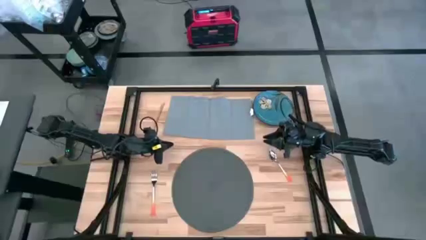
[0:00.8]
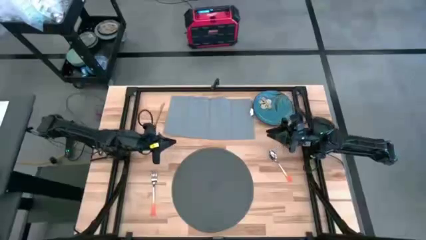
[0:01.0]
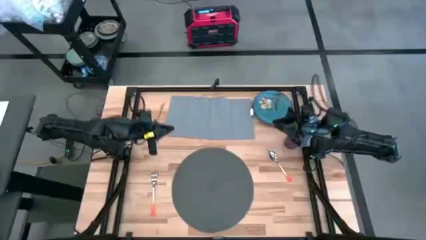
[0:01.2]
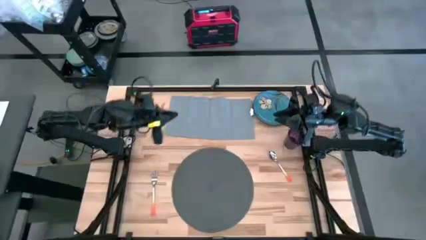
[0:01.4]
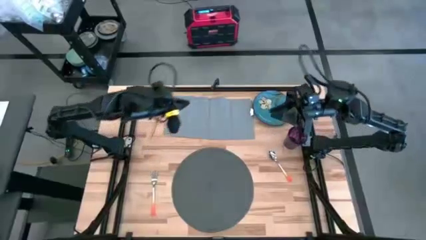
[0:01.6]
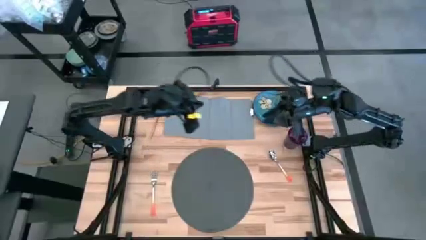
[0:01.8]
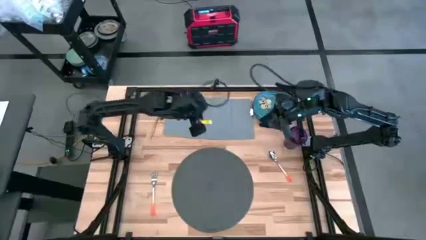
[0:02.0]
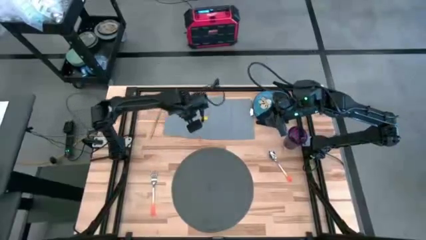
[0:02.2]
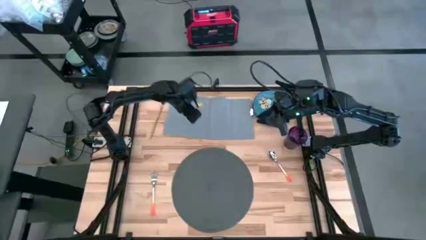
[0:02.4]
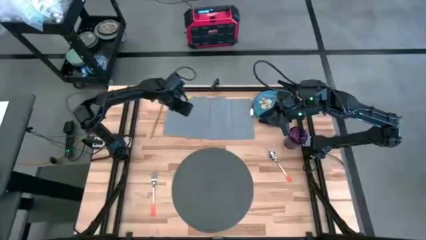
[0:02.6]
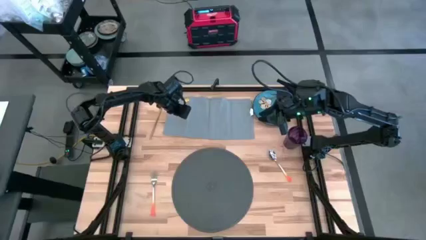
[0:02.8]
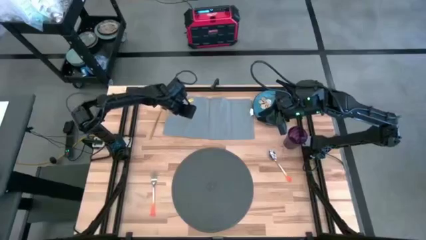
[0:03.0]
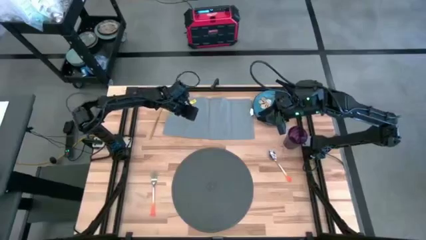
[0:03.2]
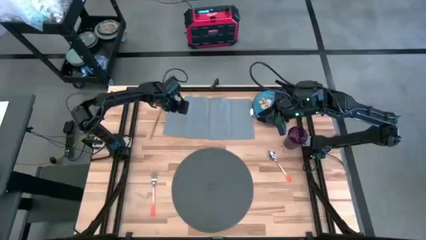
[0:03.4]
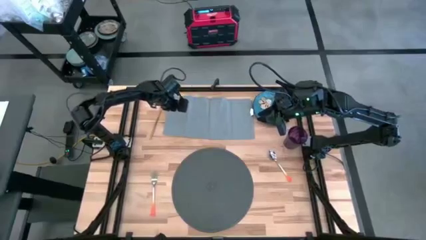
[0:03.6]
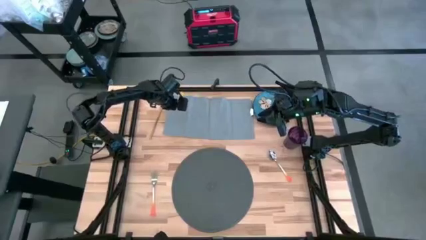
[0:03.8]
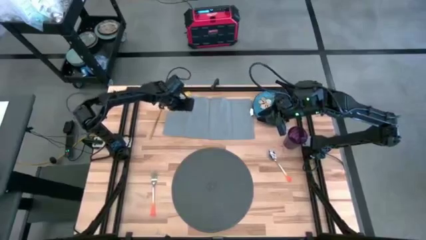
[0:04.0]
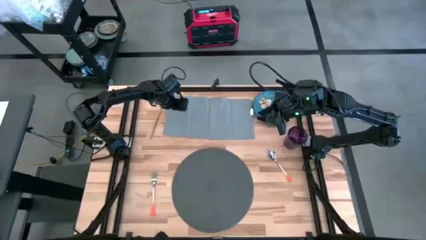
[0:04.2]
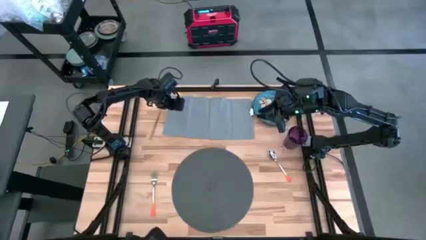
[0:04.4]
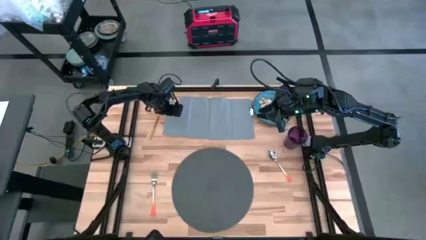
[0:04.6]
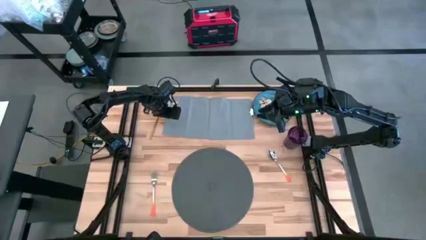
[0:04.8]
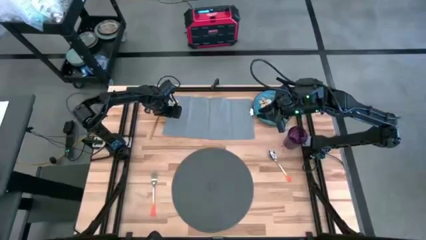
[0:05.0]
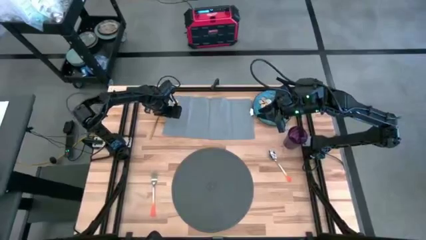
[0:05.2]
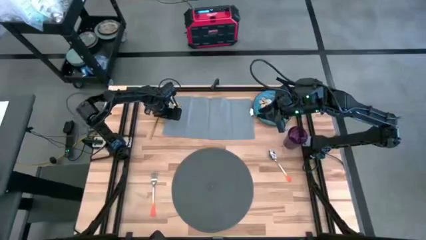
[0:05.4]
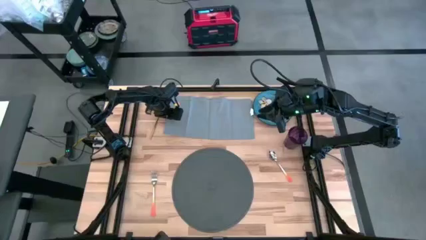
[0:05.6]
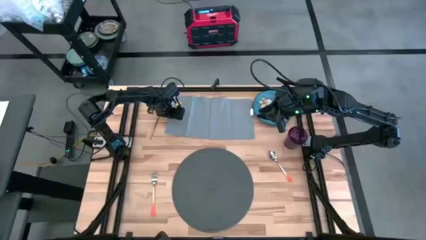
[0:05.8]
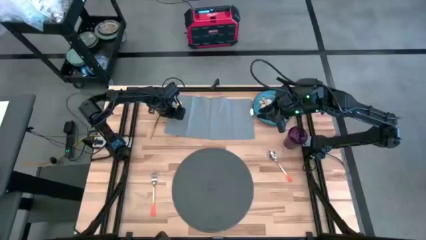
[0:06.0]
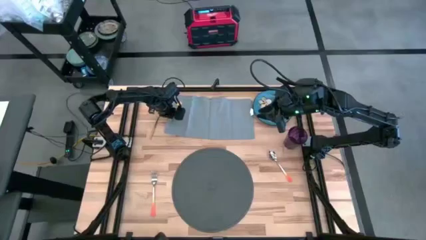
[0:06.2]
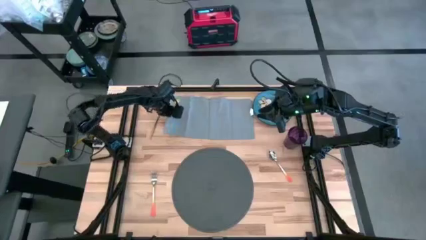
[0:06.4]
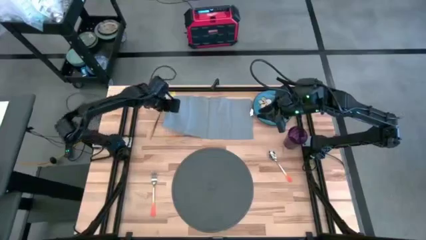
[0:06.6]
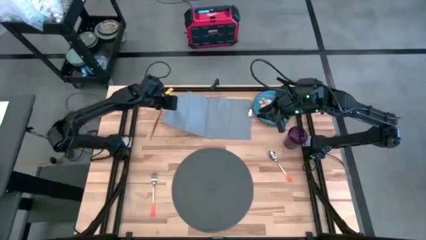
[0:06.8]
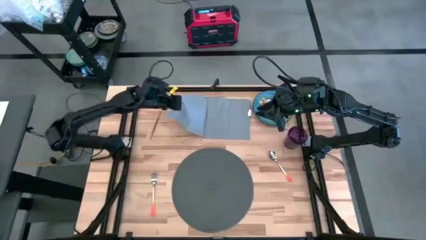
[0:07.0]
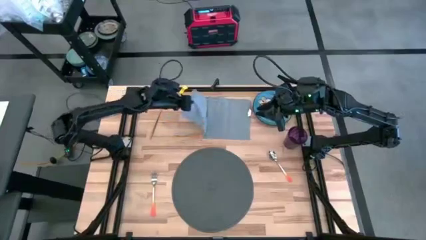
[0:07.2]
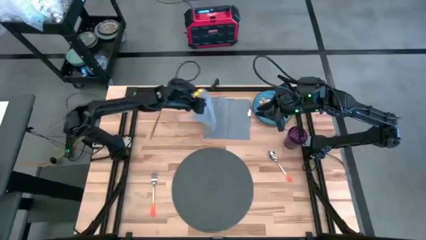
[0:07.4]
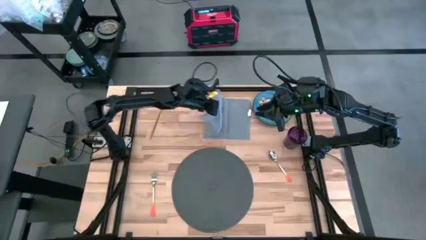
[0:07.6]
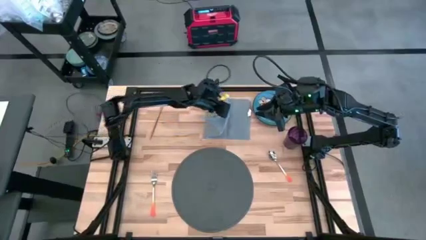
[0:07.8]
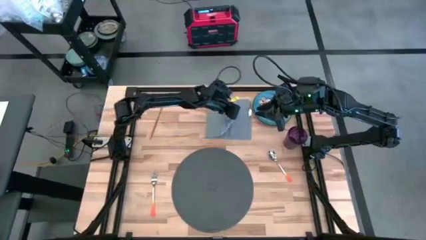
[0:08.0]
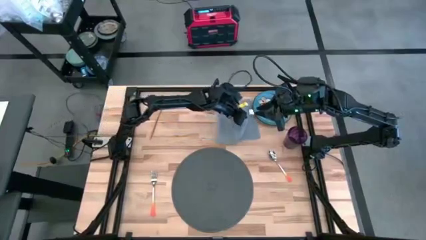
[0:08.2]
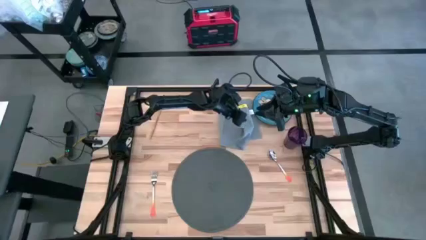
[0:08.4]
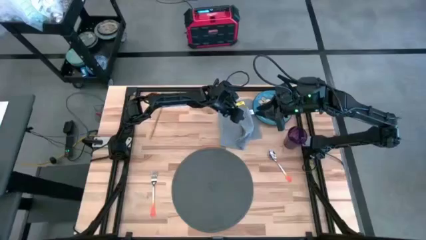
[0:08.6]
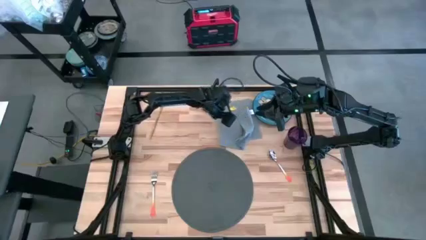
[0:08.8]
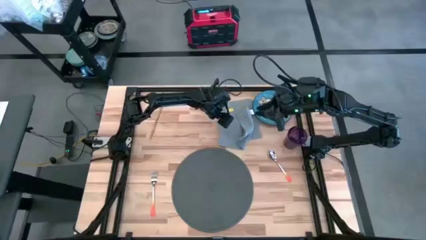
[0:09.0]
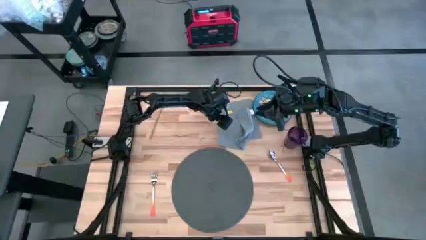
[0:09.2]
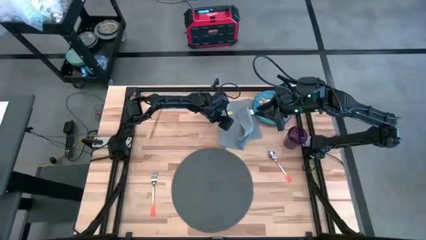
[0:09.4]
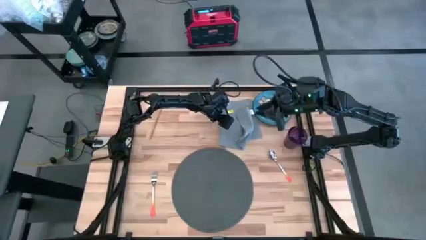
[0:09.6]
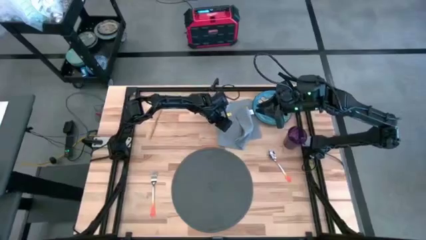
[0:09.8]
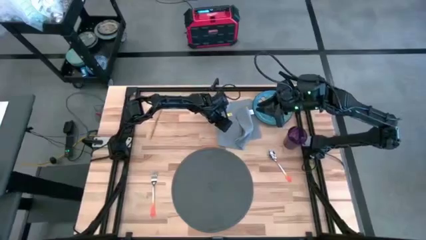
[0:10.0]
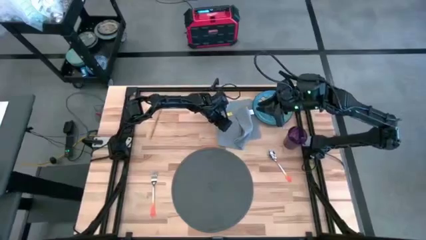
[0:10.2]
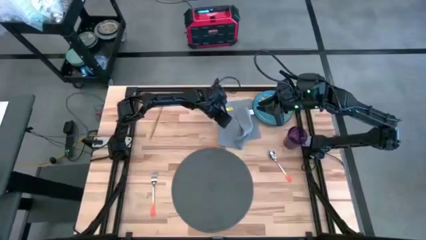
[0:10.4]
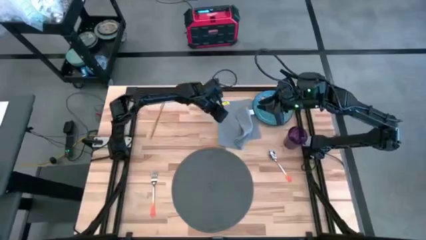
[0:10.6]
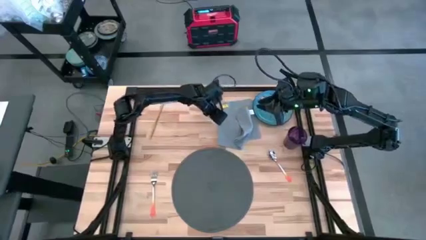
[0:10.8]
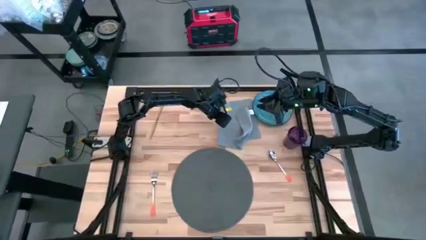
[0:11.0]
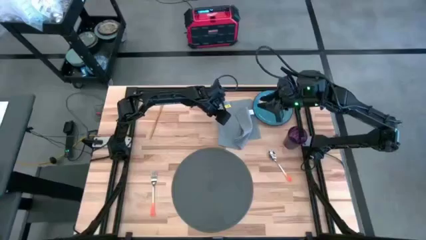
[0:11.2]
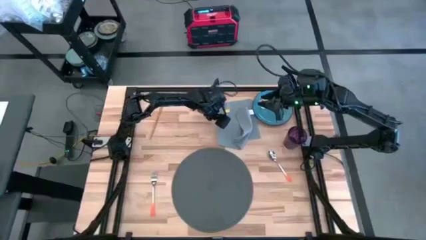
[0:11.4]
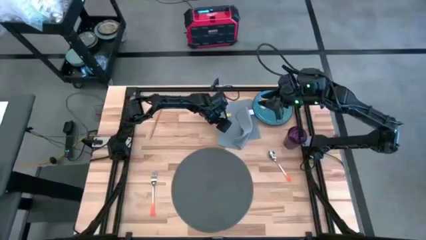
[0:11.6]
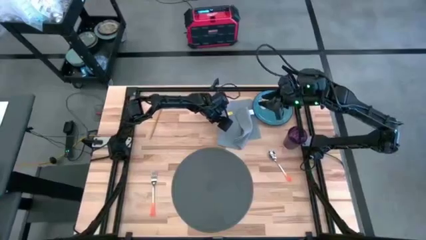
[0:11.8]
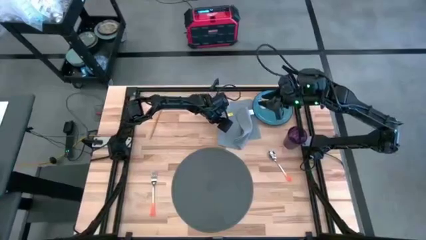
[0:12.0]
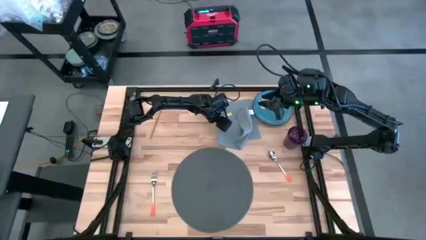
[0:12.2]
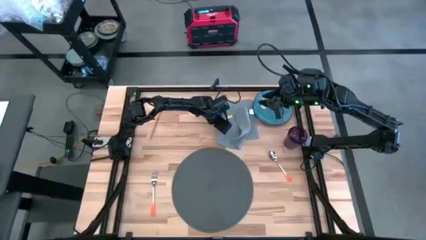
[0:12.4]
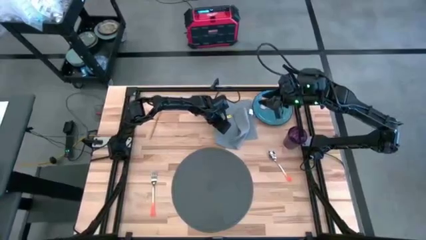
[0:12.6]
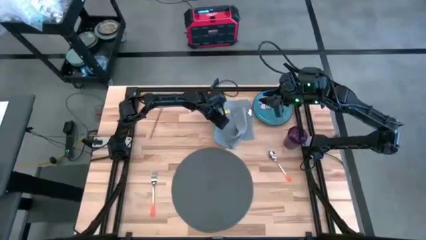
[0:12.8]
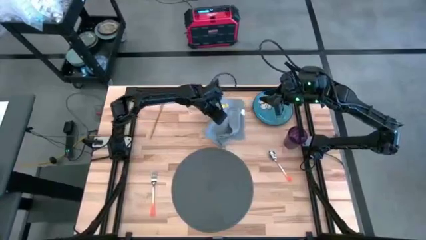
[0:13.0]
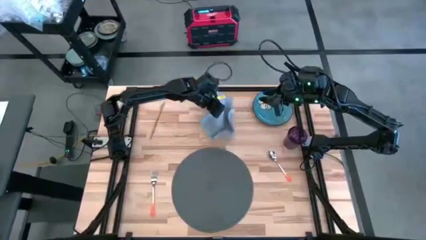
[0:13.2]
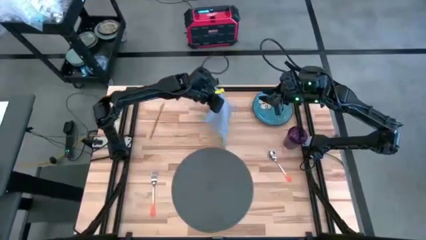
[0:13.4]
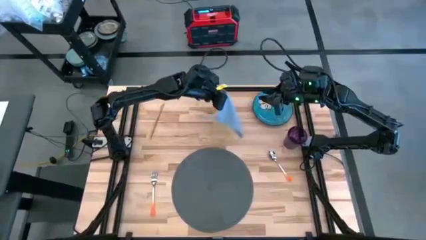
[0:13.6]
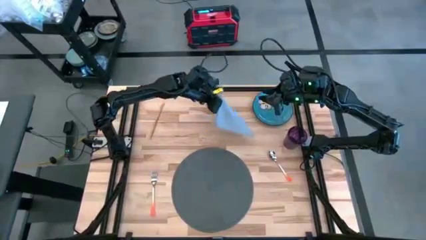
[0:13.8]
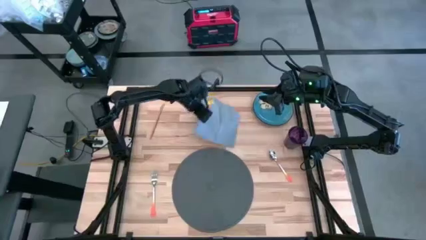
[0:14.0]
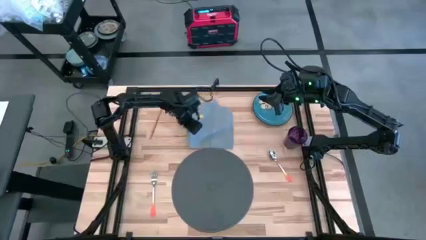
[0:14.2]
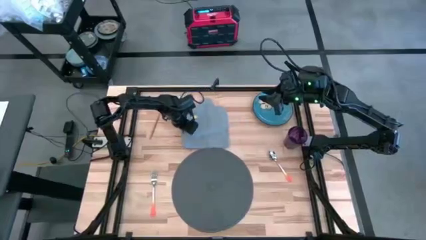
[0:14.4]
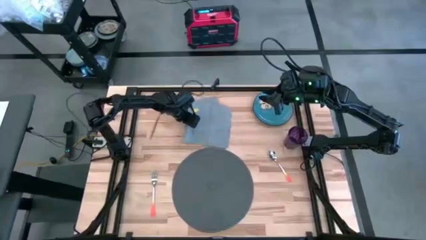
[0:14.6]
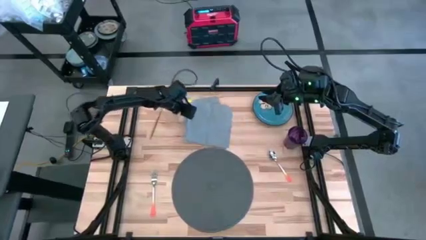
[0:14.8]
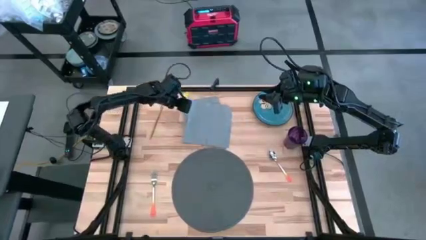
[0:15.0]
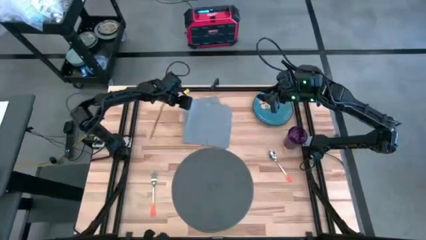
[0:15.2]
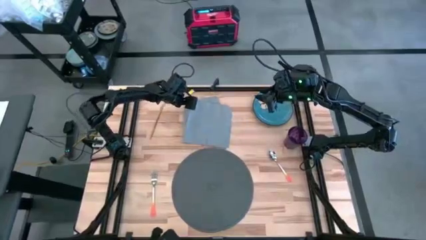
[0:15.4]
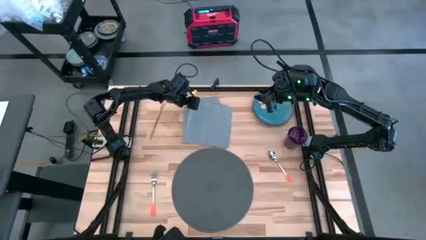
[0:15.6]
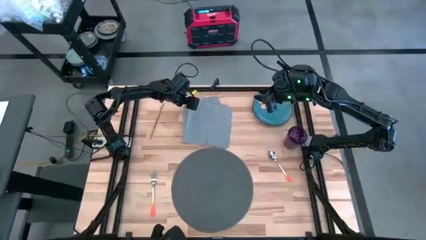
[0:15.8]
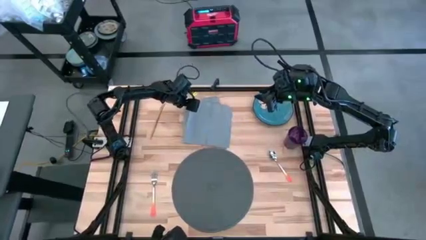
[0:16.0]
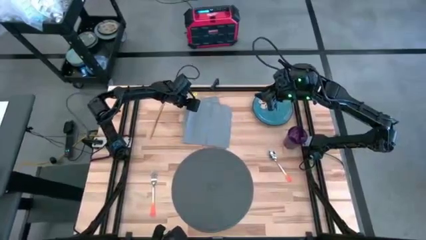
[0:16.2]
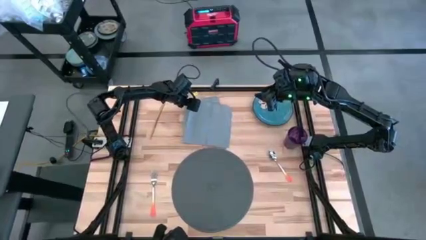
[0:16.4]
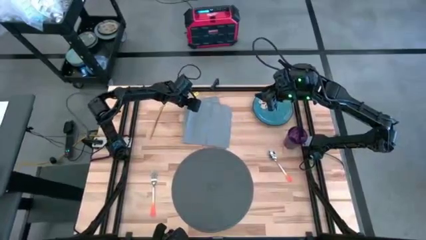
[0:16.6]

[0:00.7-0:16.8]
Task: Set table place
Fold the gray table napkin
